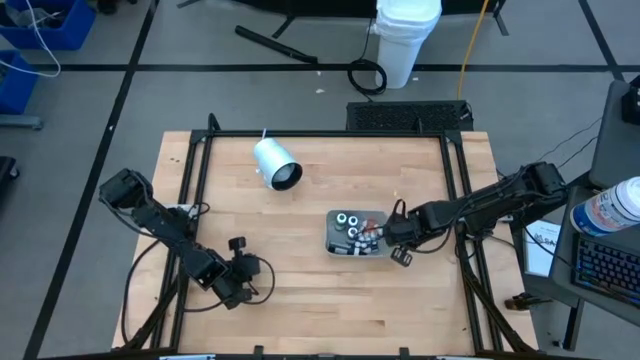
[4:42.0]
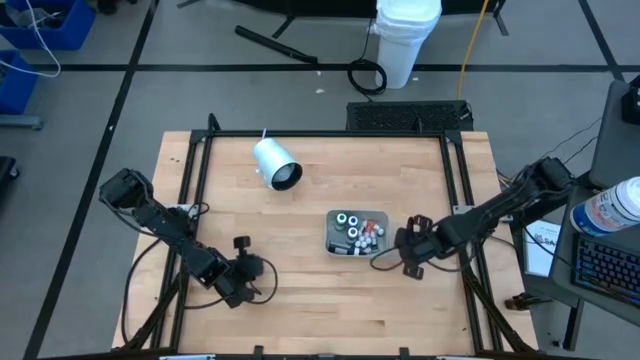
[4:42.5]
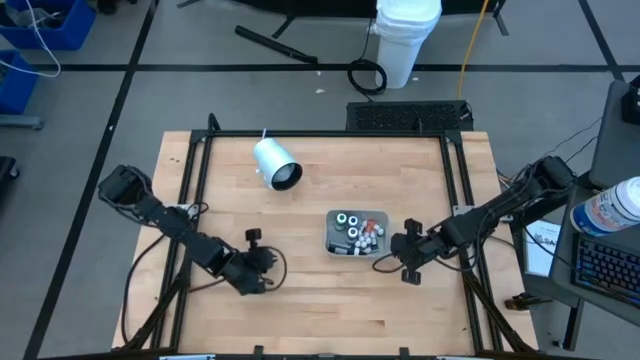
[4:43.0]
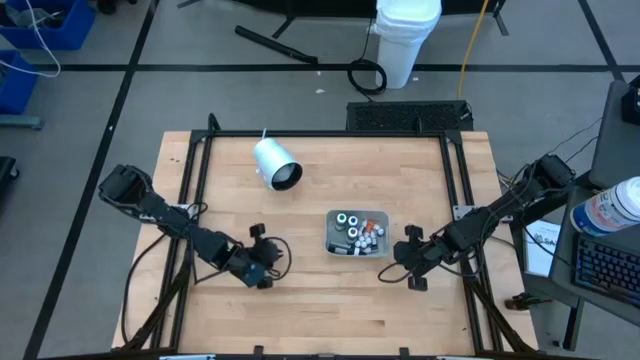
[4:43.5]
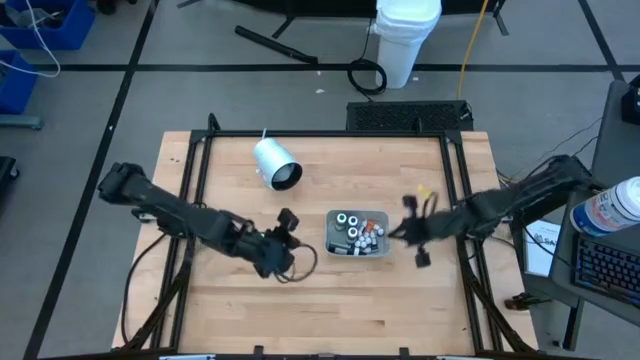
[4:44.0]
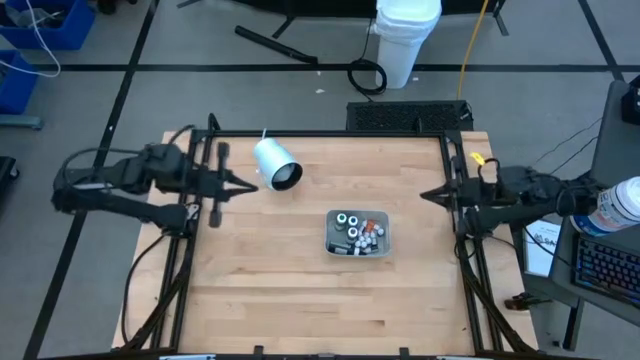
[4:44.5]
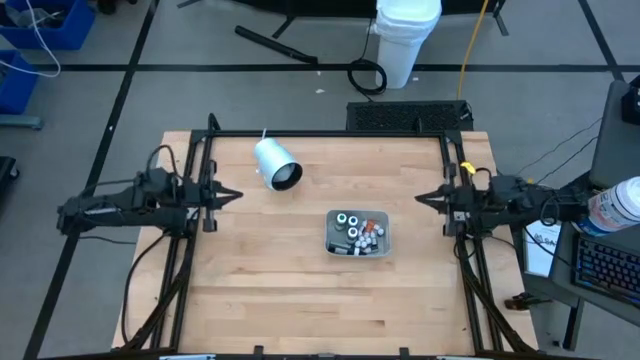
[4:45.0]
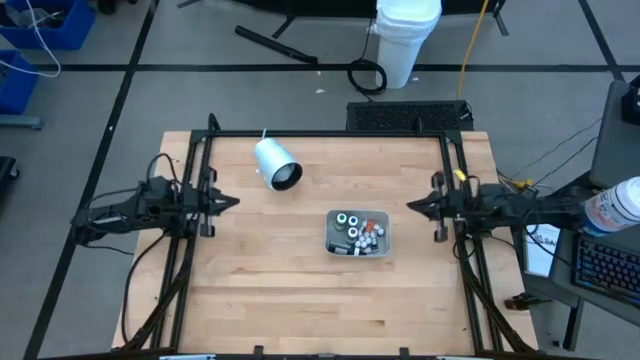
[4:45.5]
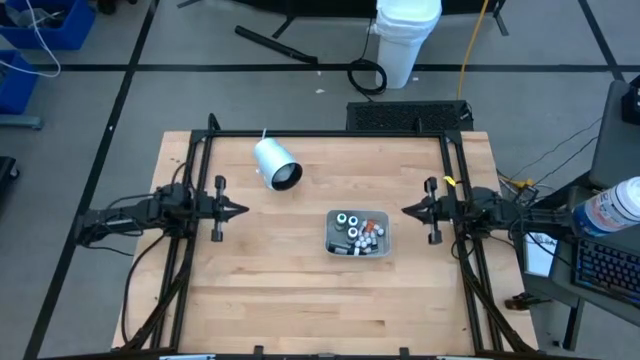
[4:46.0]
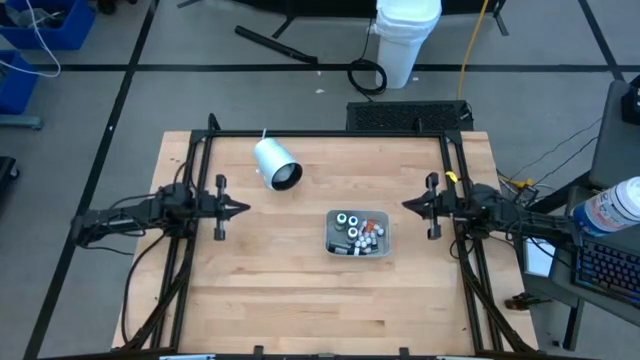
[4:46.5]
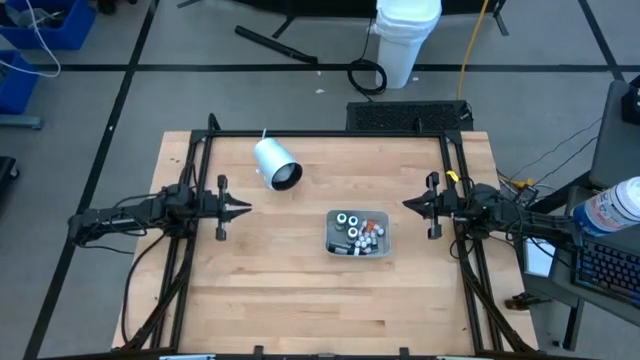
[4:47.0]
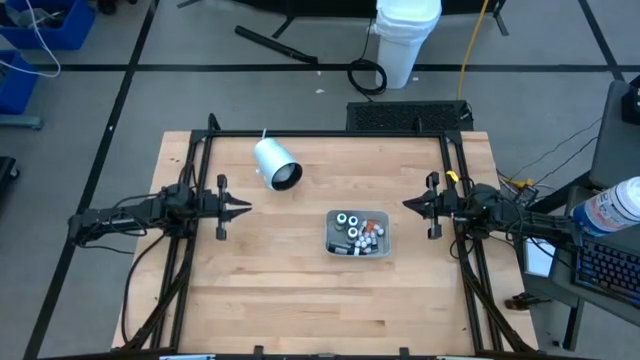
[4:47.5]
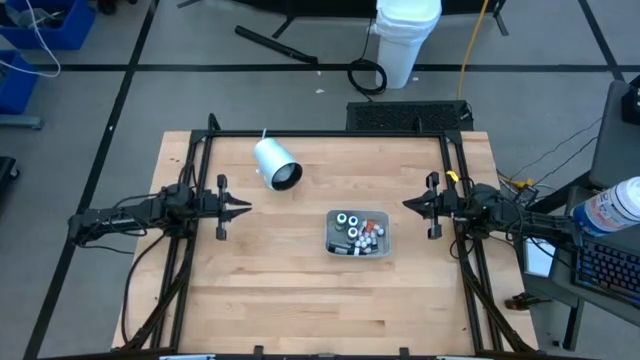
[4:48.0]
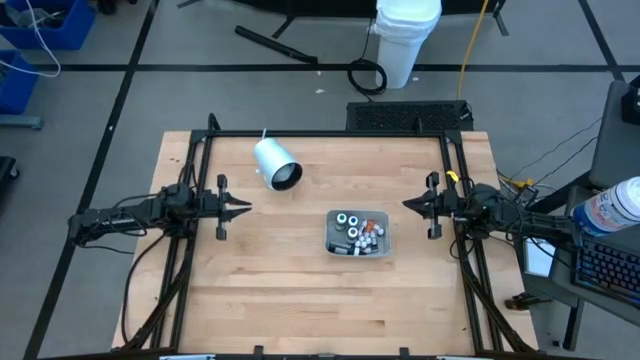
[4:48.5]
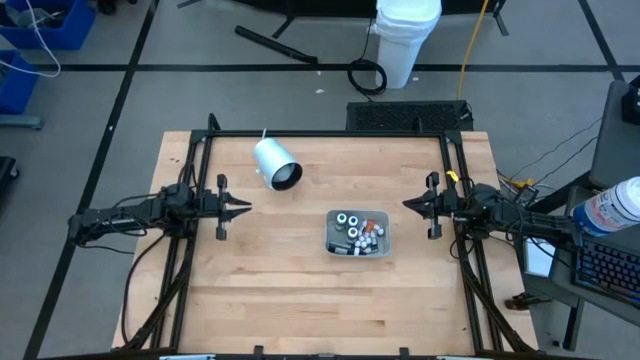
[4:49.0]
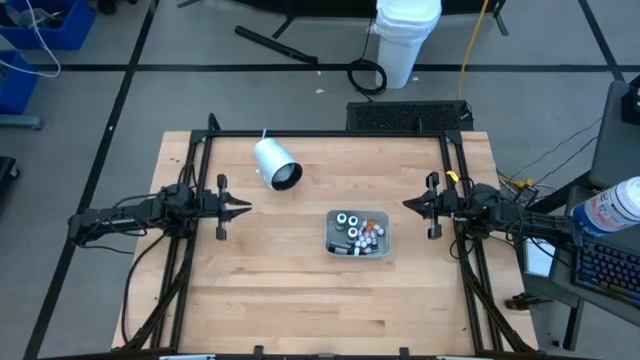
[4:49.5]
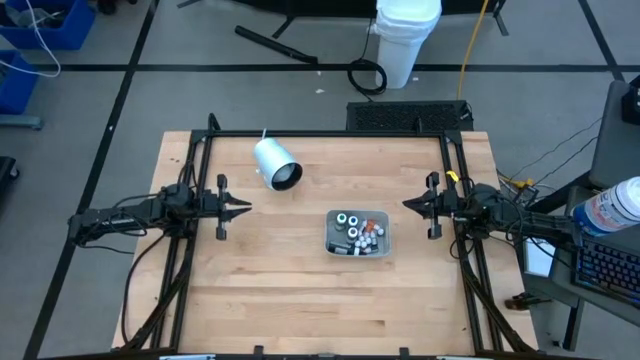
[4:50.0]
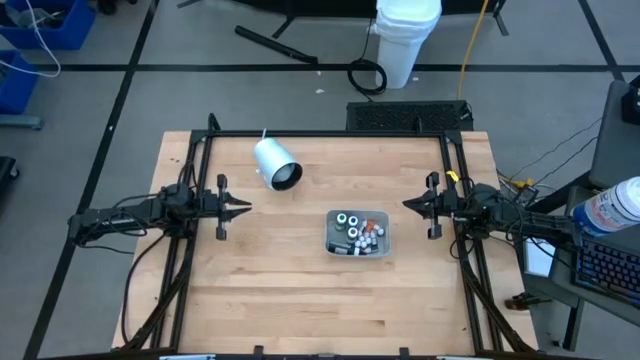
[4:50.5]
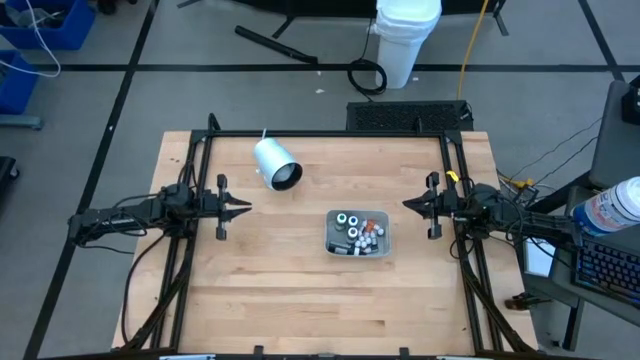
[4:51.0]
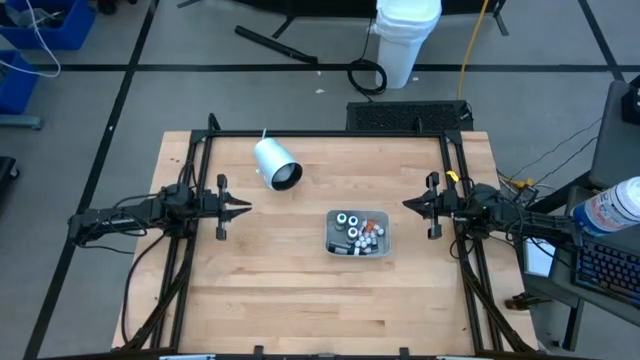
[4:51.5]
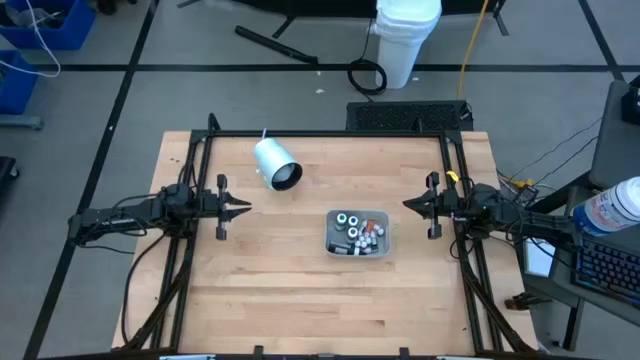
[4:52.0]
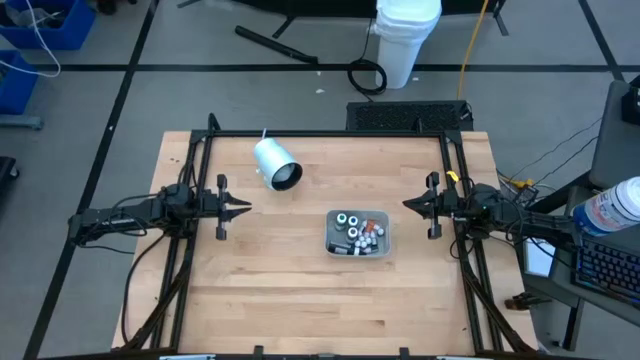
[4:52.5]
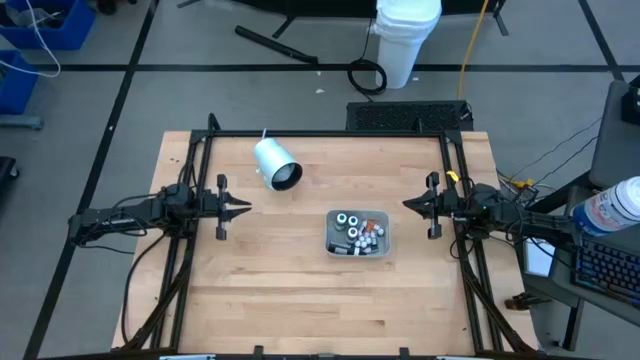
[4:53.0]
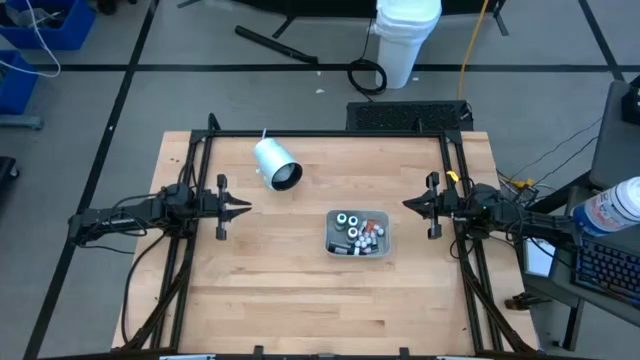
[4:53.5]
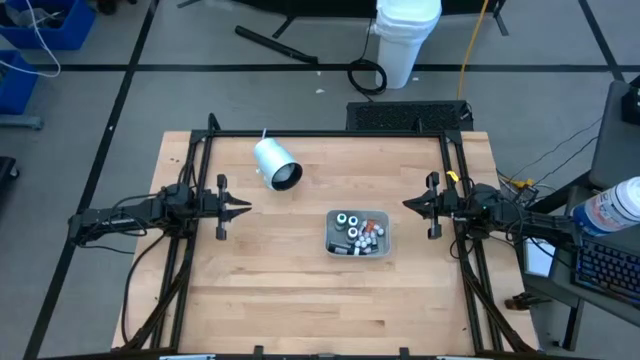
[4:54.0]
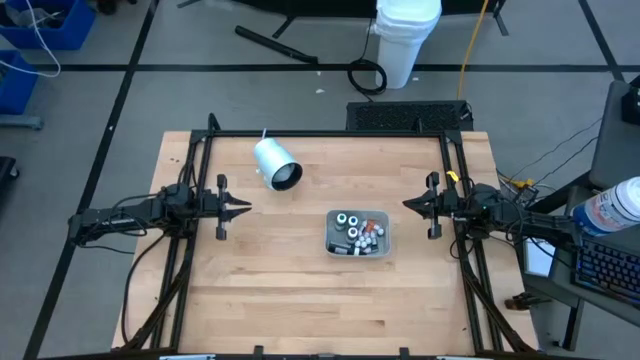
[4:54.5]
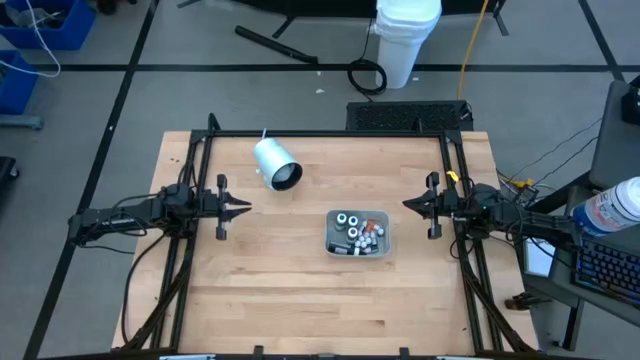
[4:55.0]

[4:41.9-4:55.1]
Task: Pick & Place food coloring
Return to Home Position

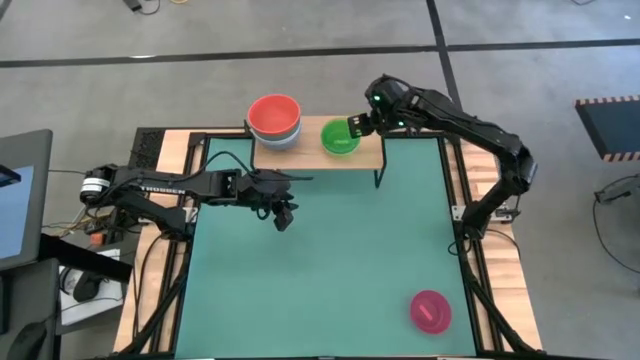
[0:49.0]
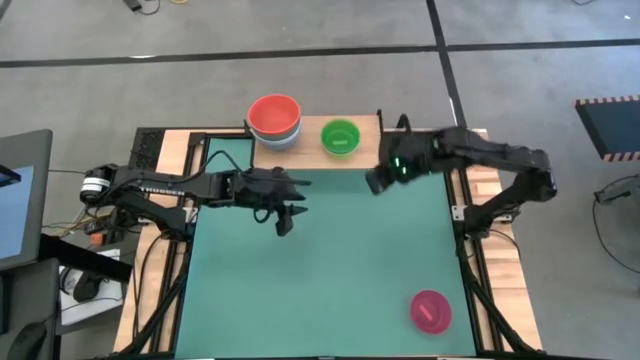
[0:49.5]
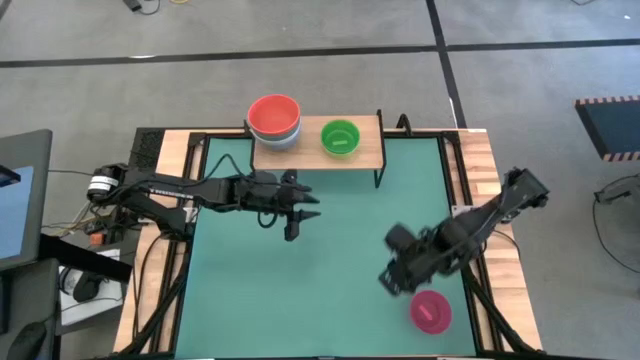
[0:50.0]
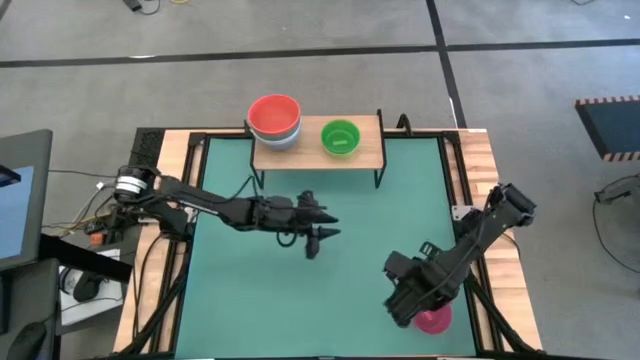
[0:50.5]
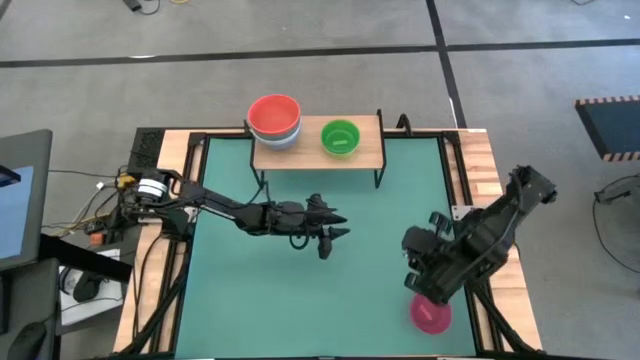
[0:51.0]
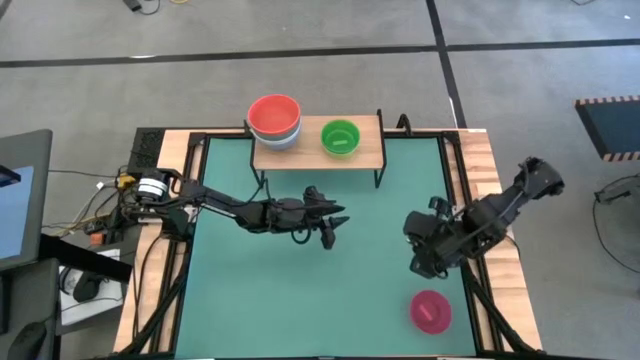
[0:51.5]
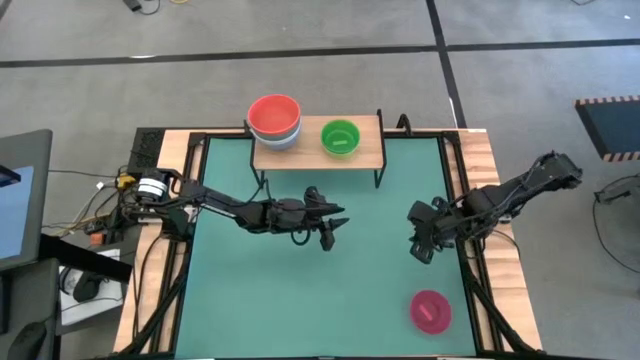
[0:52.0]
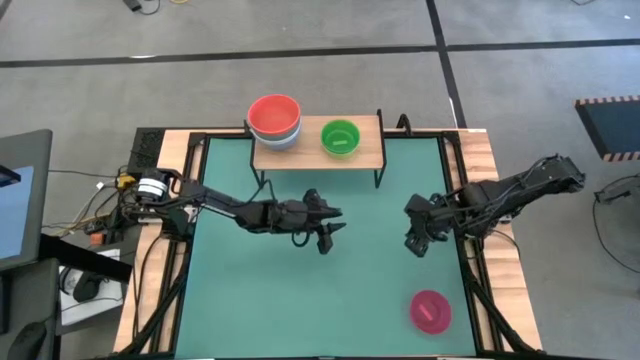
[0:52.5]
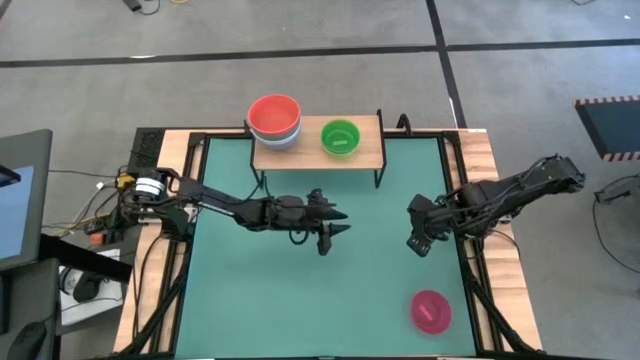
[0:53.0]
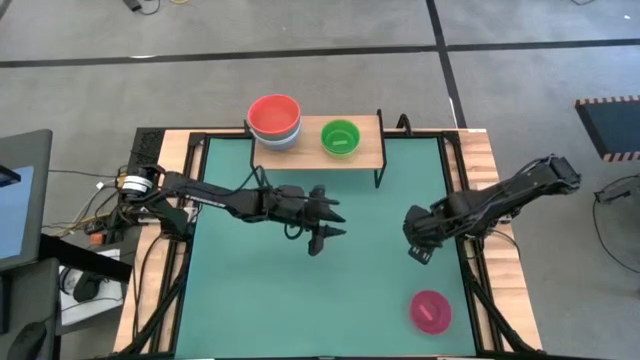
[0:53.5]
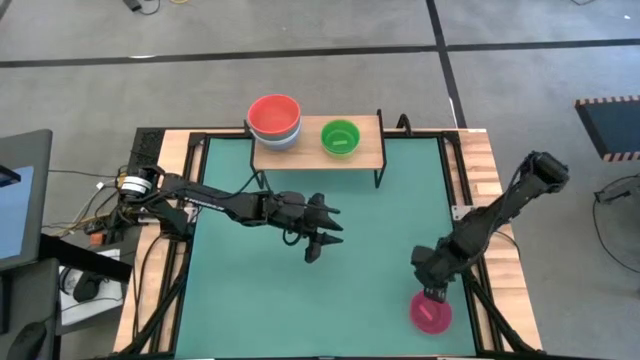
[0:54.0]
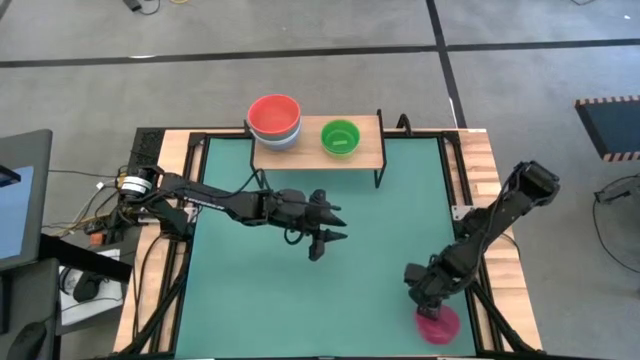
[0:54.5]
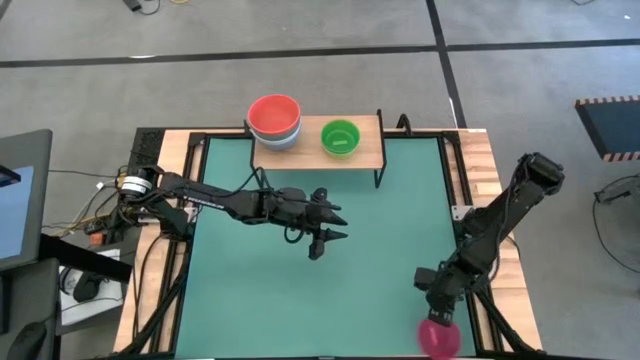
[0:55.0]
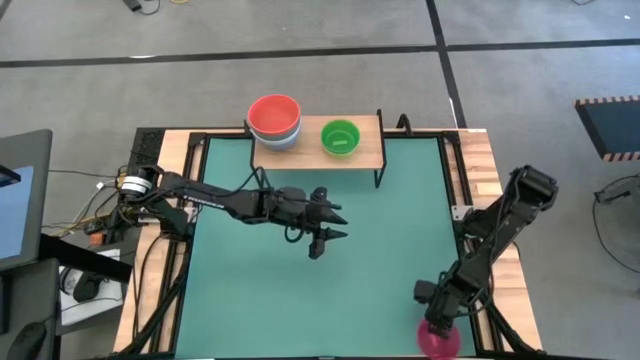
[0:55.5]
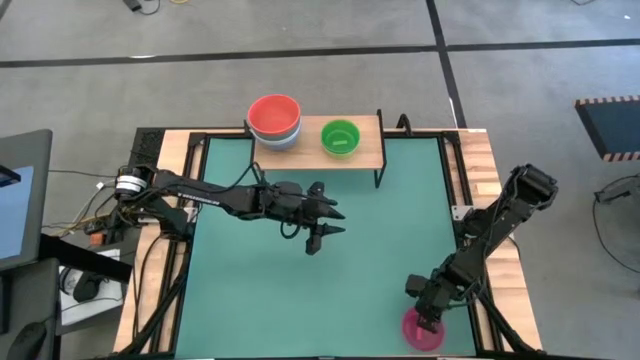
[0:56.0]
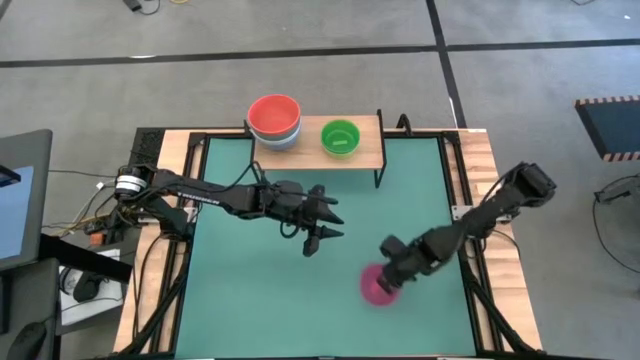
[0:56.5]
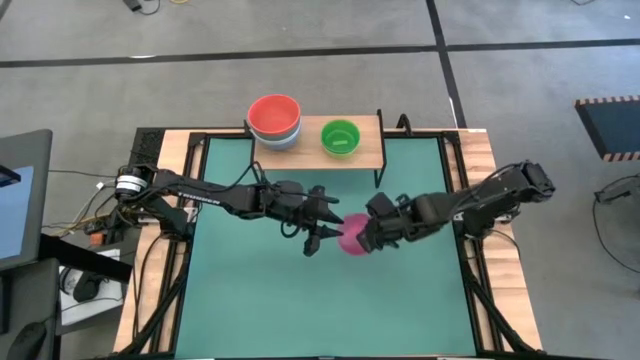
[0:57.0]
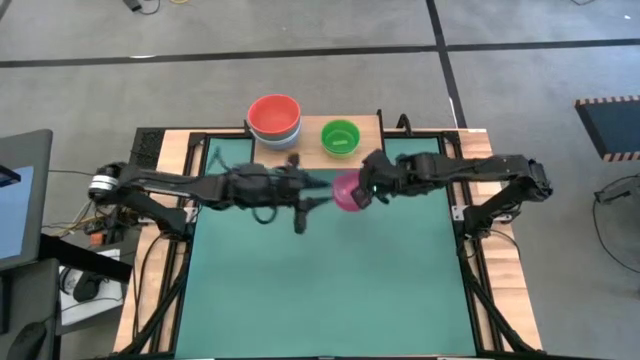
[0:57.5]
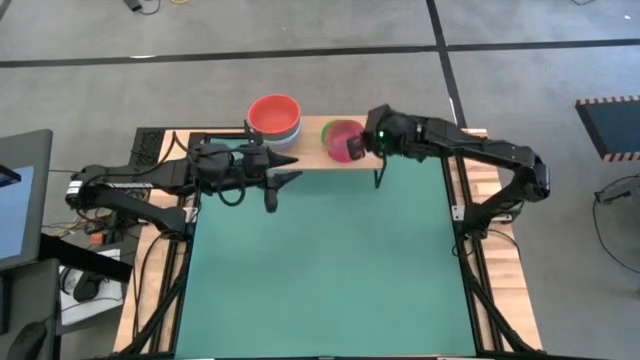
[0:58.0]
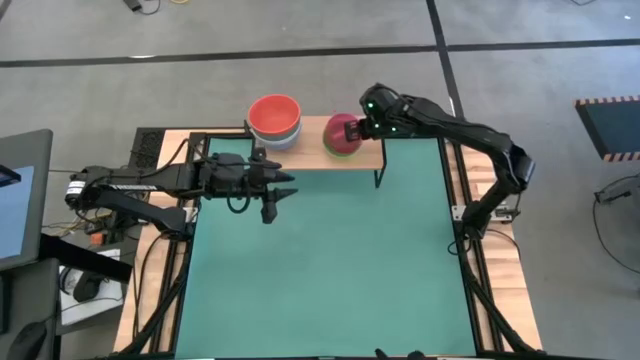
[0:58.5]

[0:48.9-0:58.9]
Task: Place and stack bowls onto a shelf
Stack the pink bowl on top of the light green bowl on the shelf
